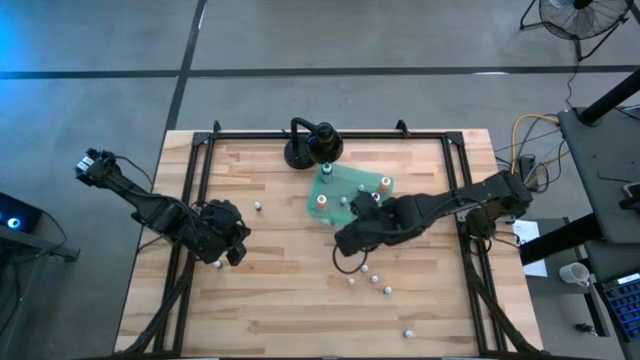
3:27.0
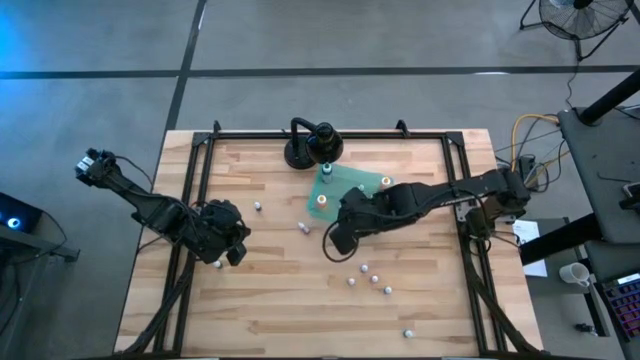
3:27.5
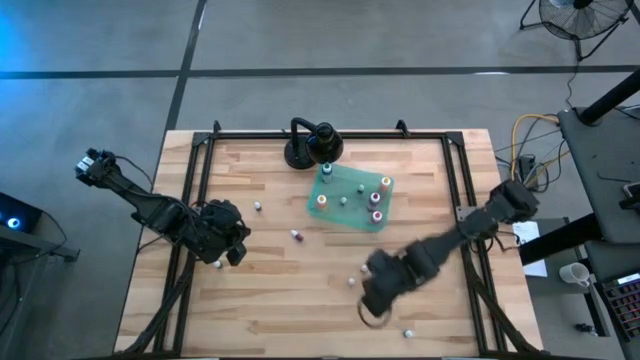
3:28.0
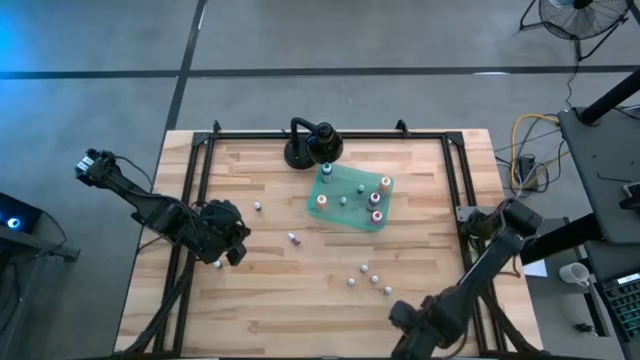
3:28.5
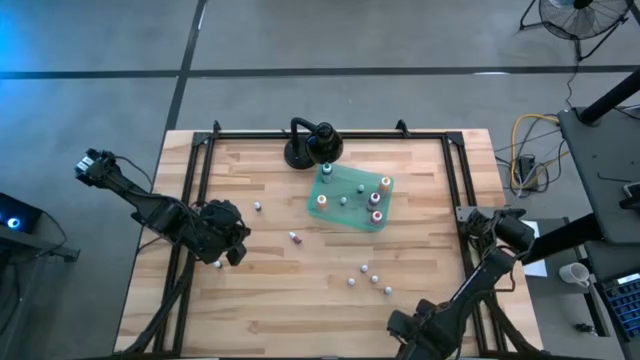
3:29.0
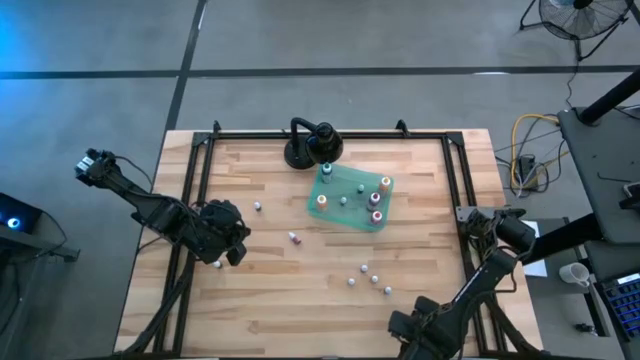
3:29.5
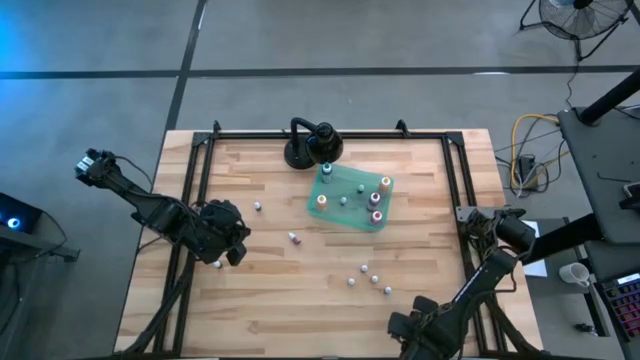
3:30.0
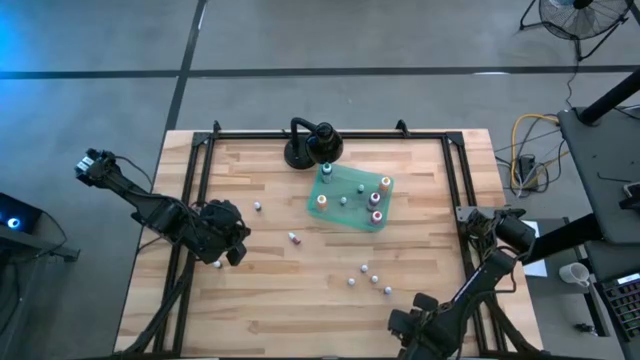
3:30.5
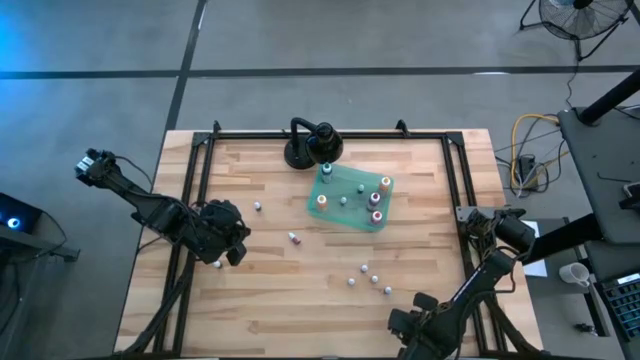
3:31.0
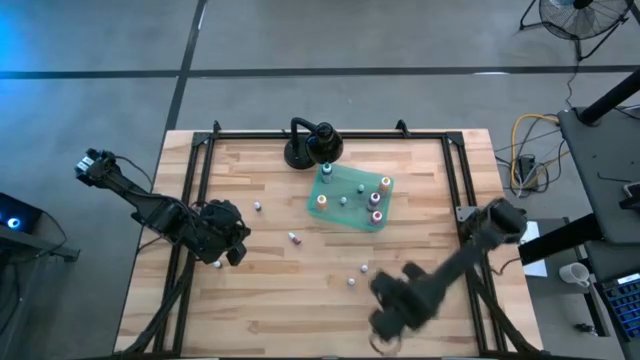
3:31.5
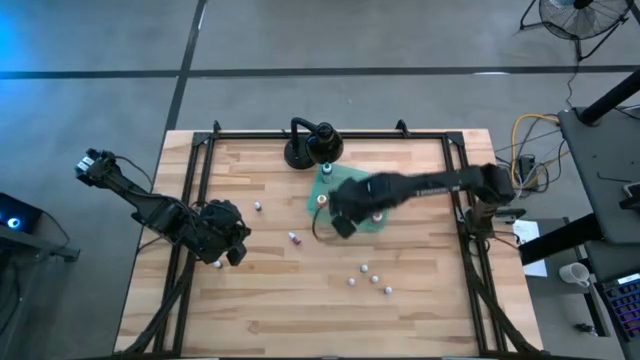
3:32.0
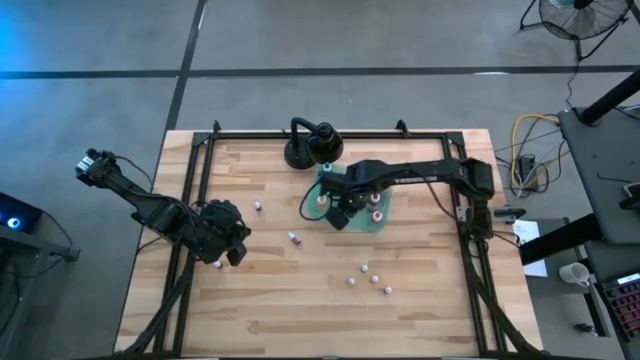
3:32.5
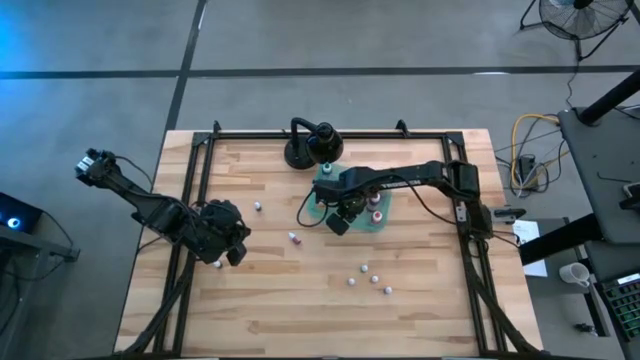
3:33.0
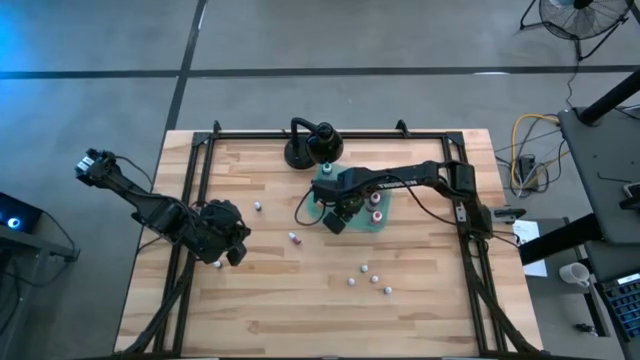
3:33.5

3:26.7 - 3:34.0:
Task: Pick & Place food coloring
Put the green food coloring bottle into the green bin

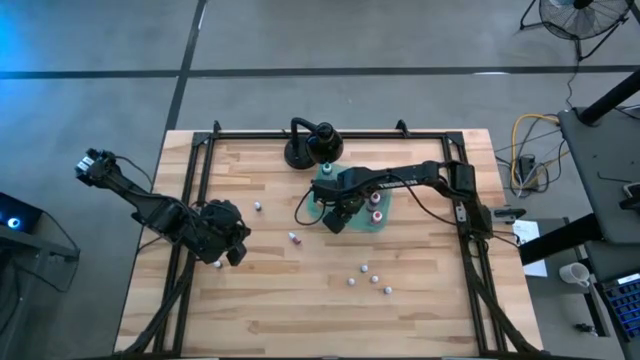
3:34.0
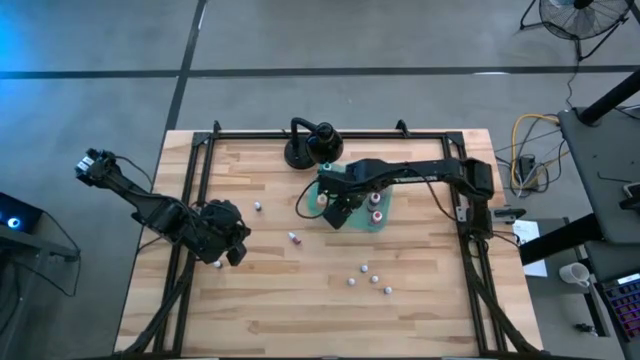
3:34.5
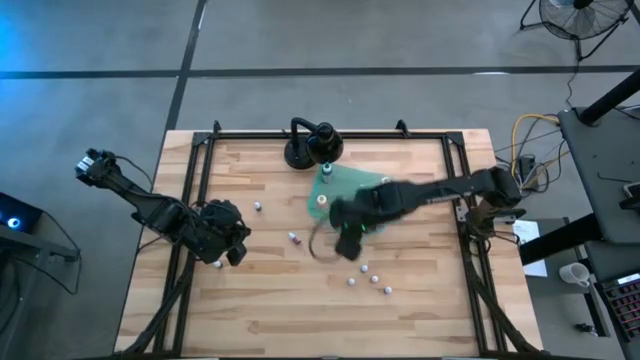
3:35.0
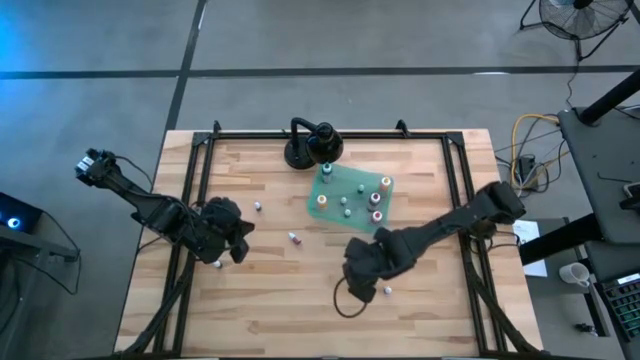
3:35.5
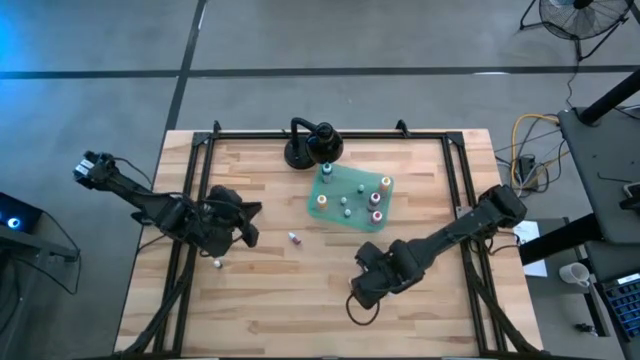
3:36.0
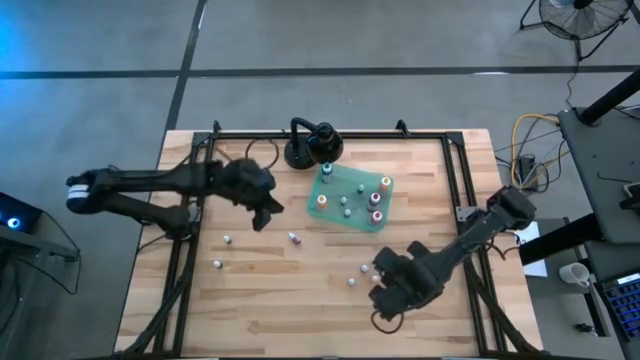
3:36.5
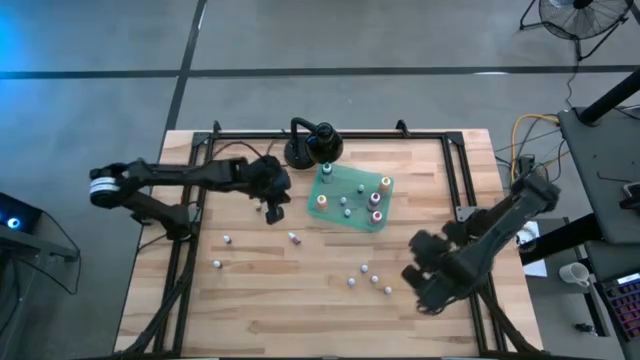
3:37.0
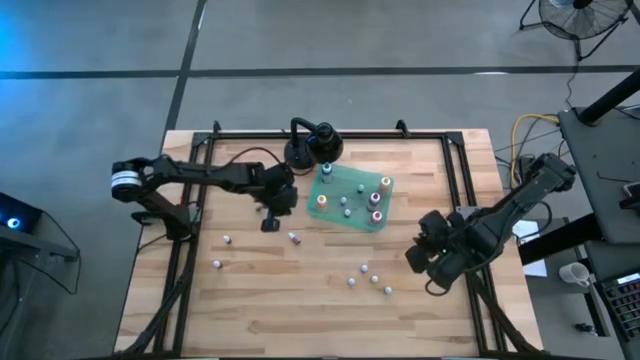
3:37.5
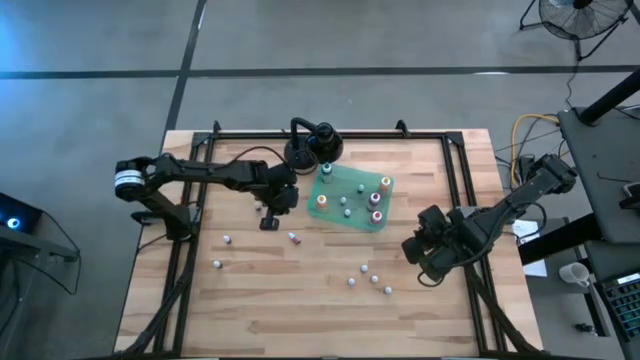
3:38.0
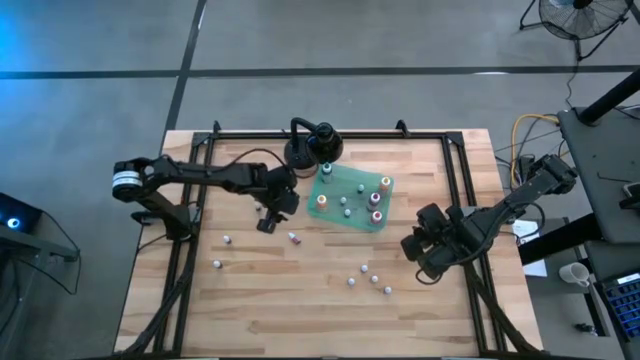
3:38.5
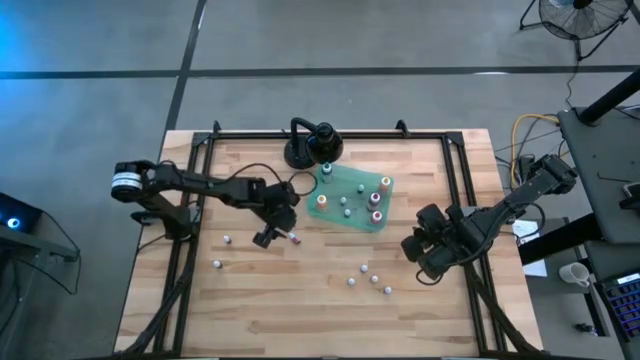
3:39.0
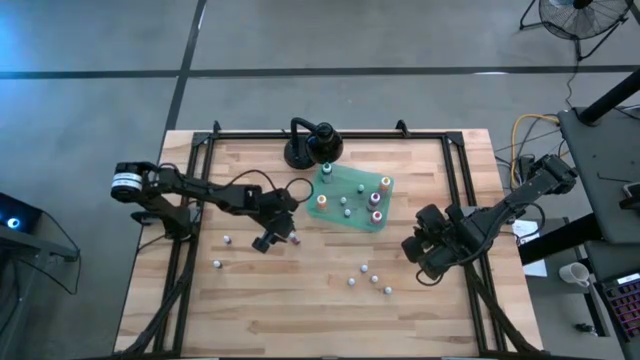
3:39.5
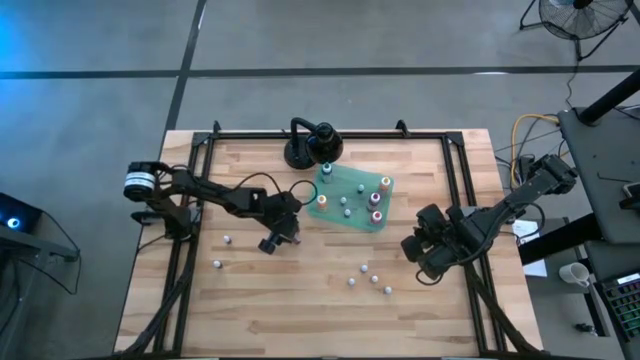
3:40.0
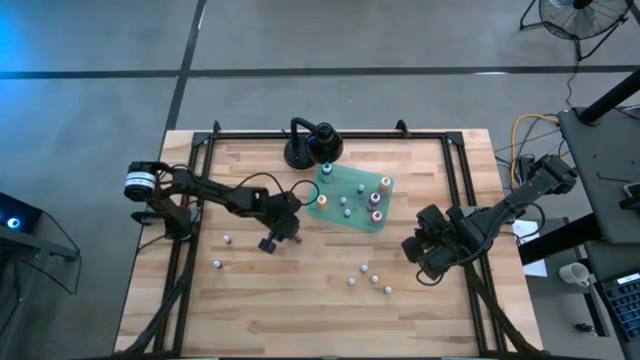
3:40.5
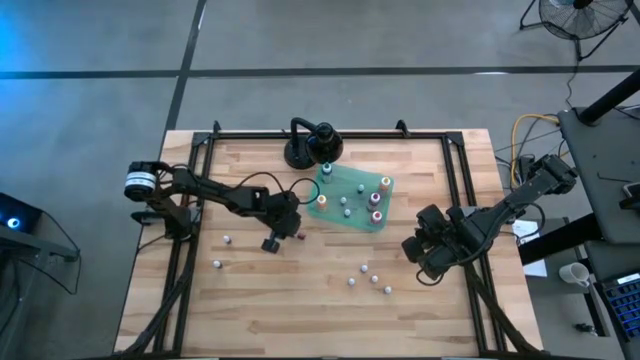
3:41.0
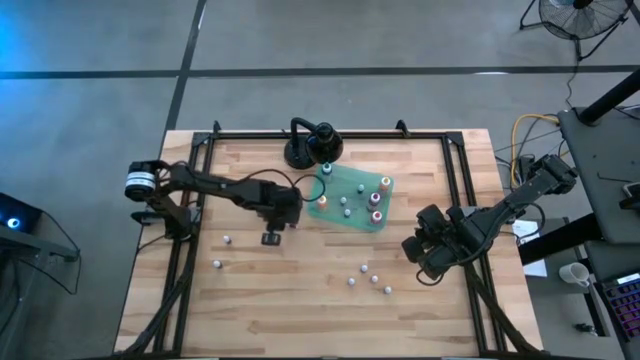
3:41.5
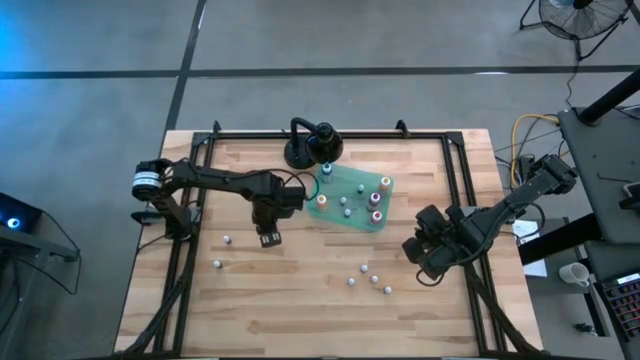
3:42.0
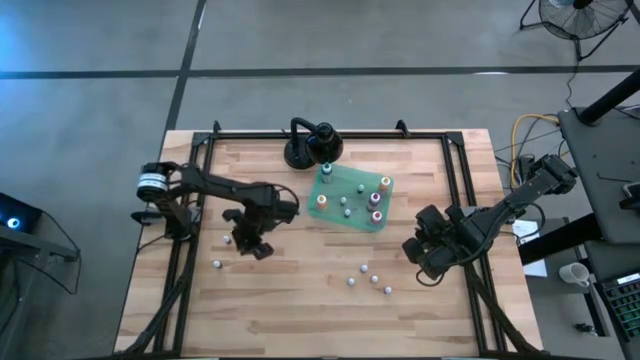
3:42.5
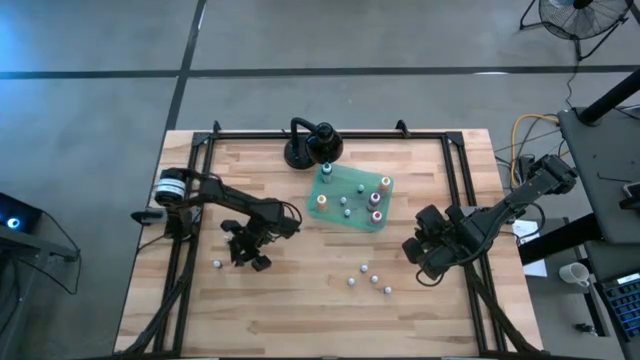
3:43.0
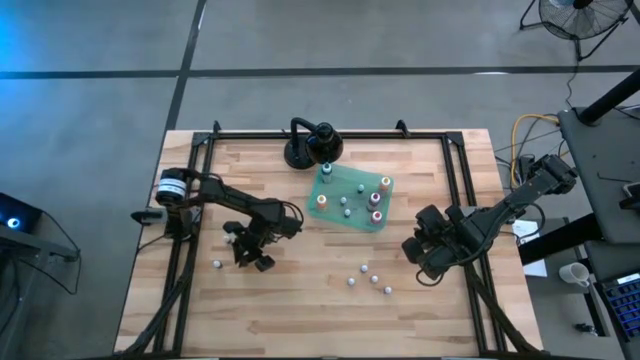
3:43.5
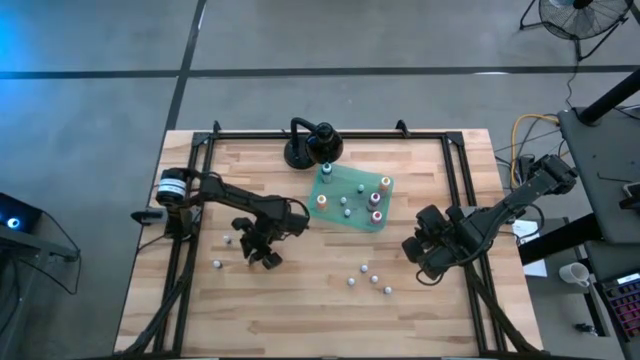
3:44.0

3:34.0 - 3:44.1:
Move the pink food coloring bottle to the middle left of the table

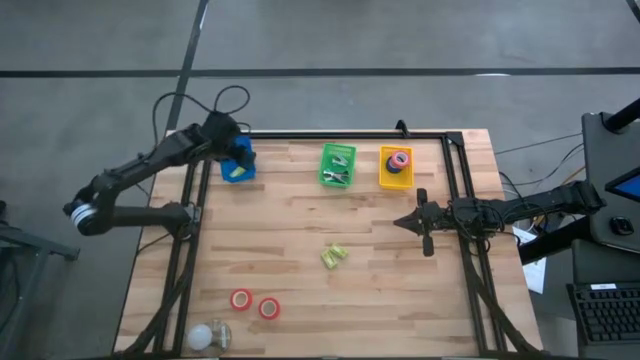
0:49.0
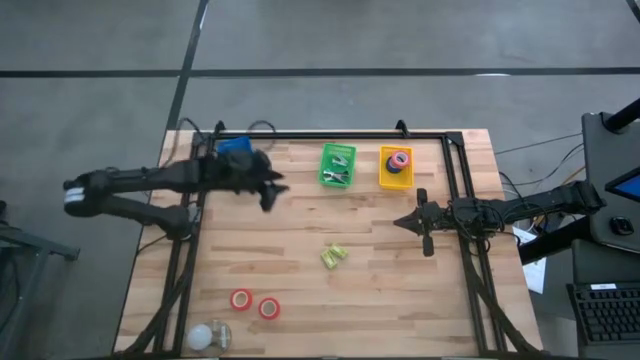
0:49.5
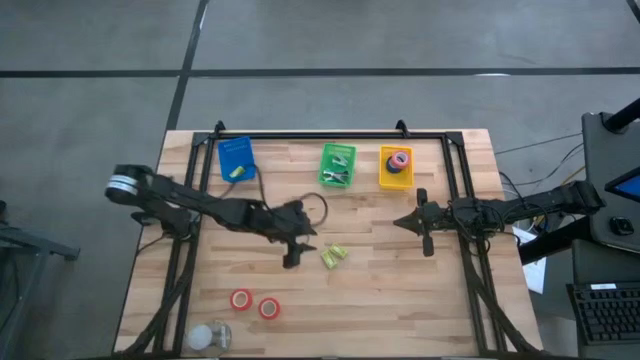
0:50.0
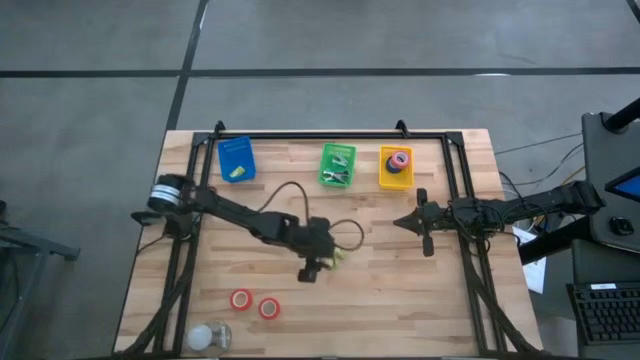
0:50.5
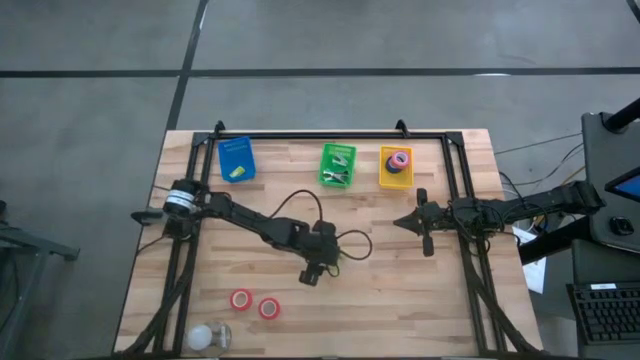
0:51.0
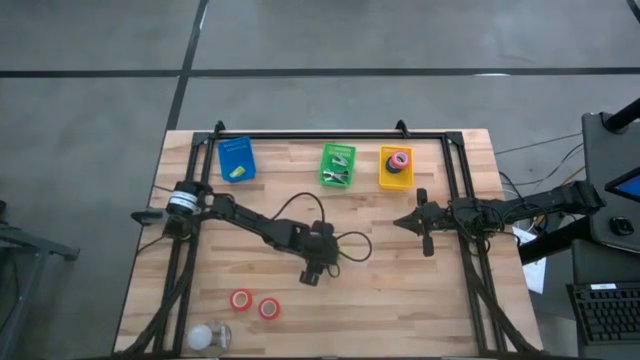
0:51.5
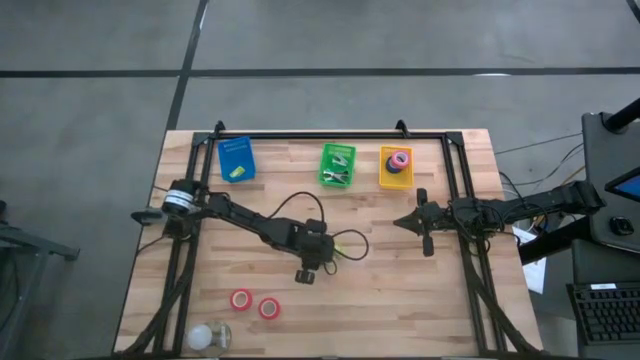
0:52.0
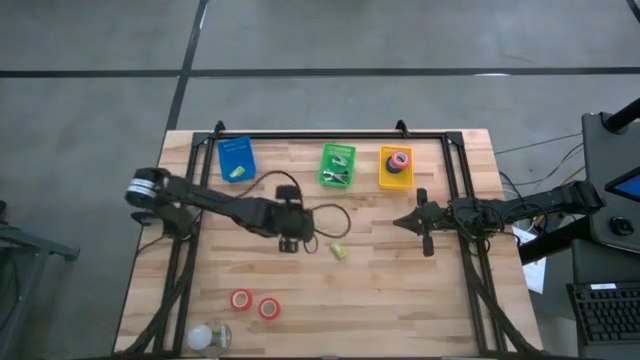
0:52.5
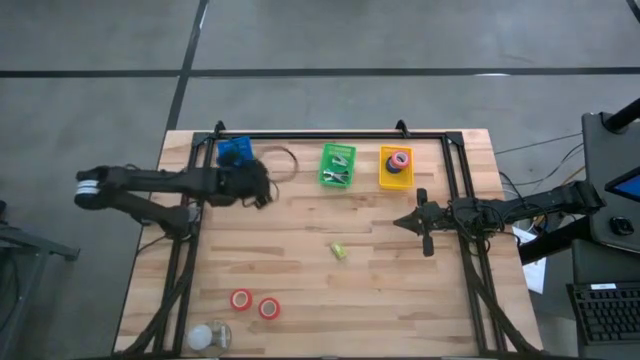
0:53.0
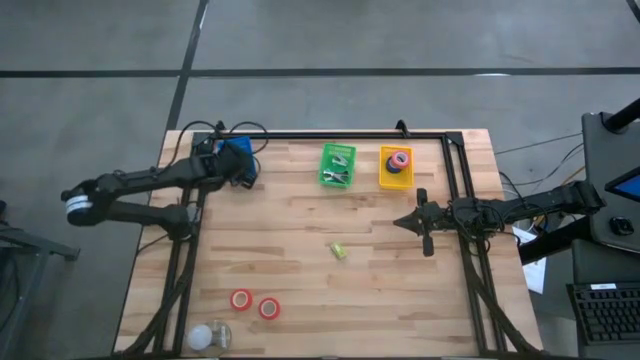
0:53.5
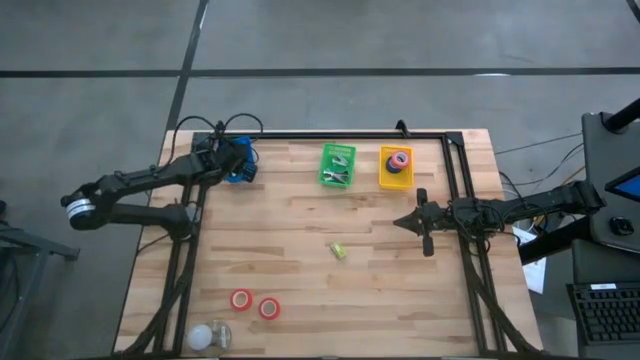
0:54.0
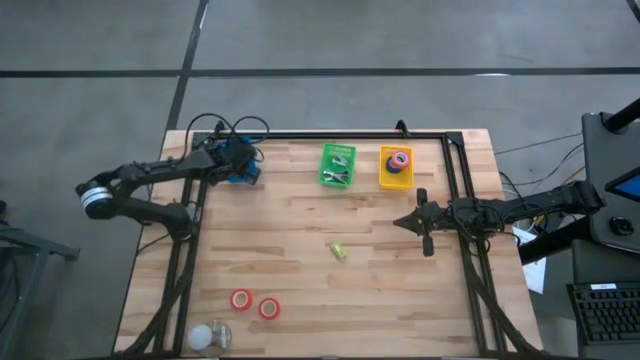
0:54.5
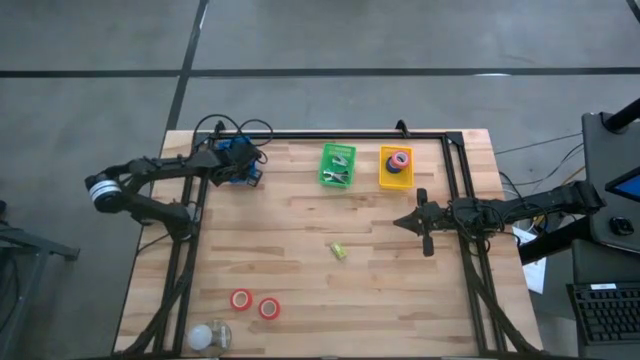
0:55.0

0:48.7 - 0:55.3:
Task: Pick and place Stapler, Stapler remover, tape
Put the bottom green stapler pin box into the blue basket
